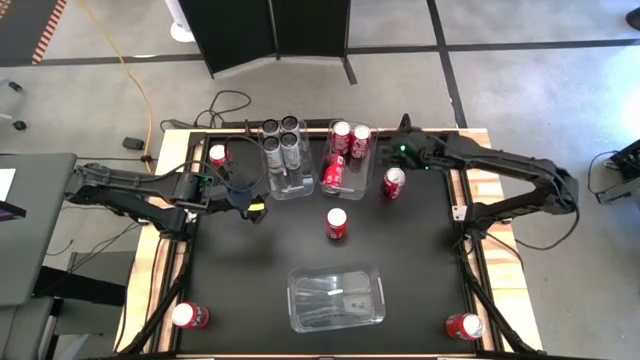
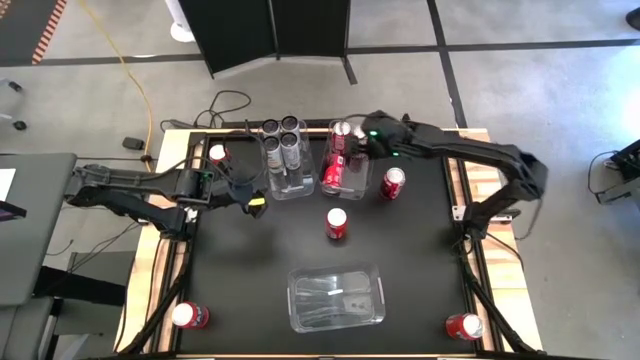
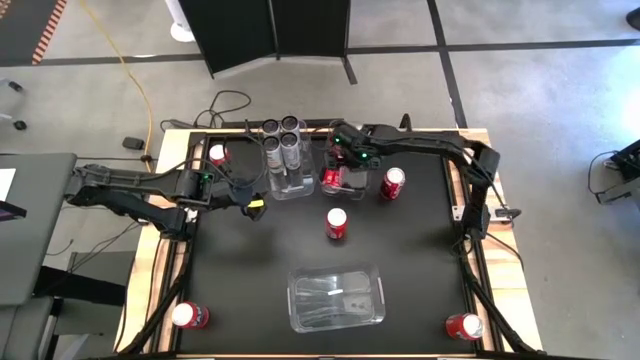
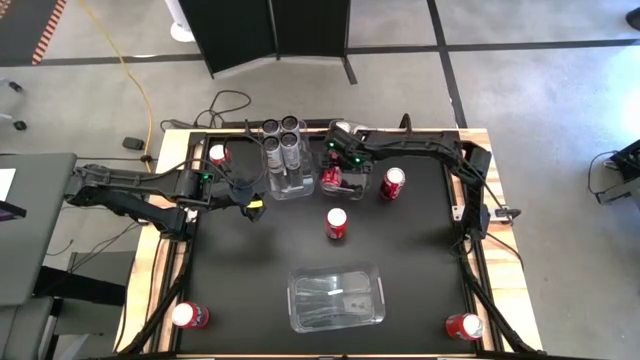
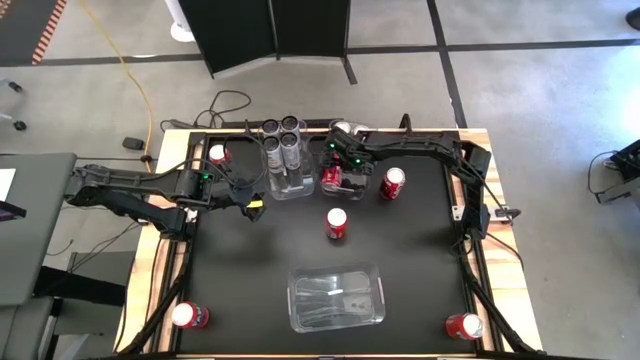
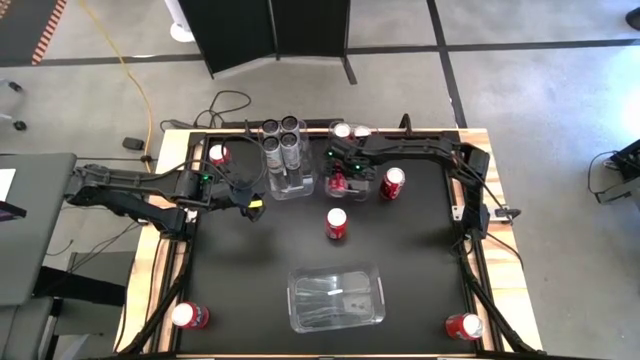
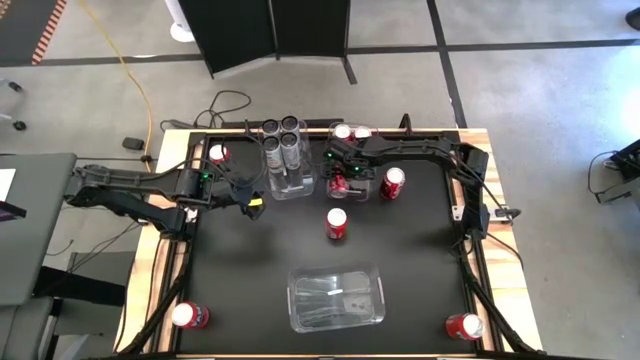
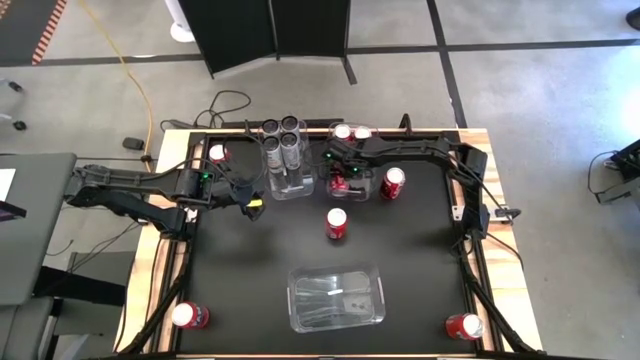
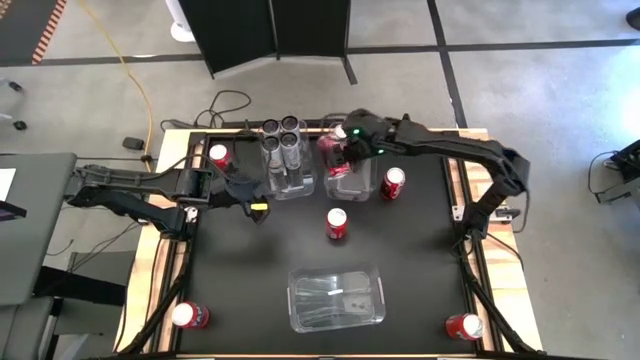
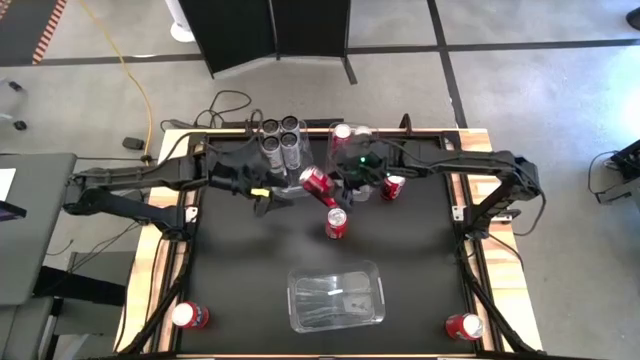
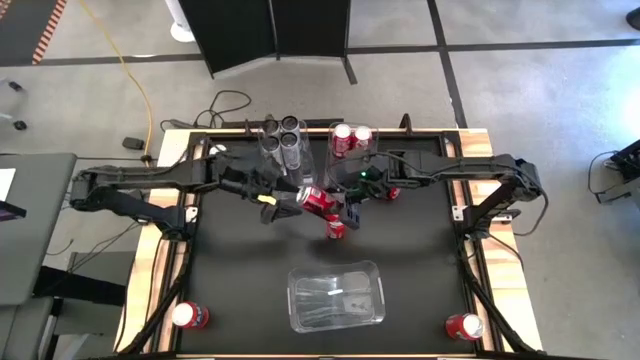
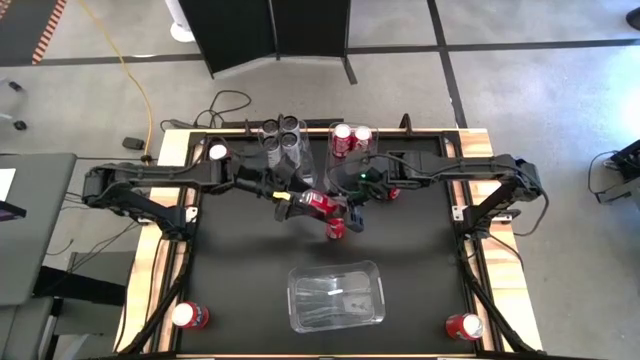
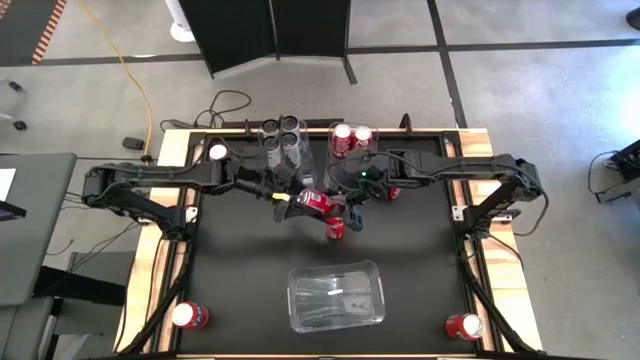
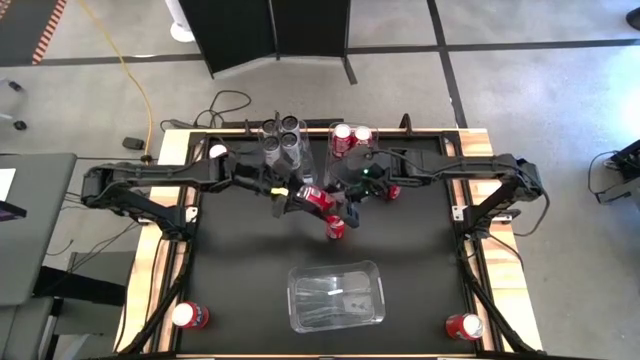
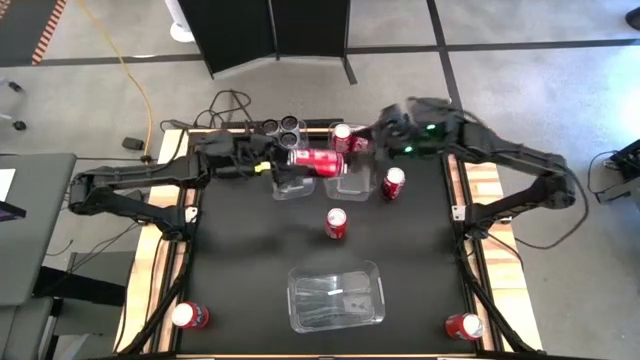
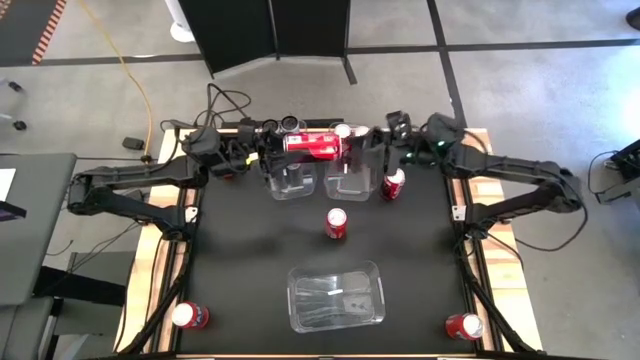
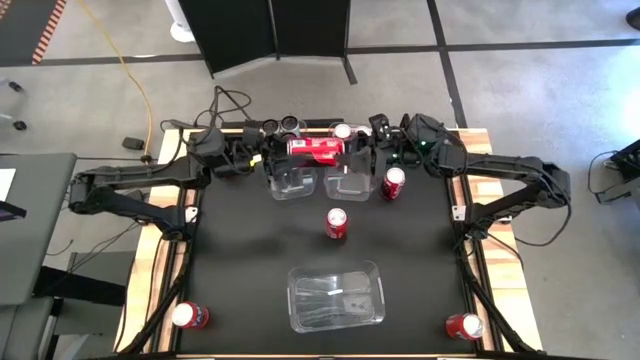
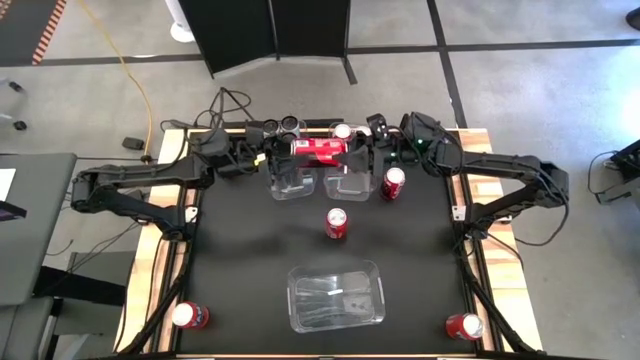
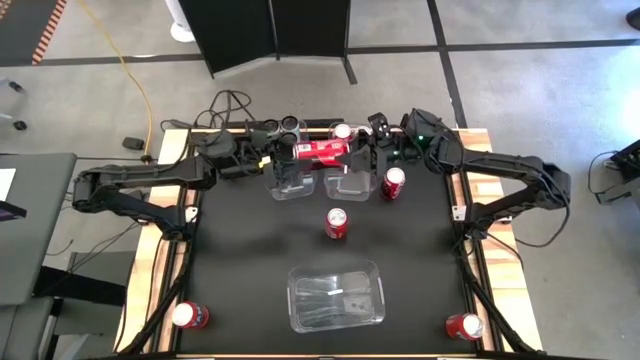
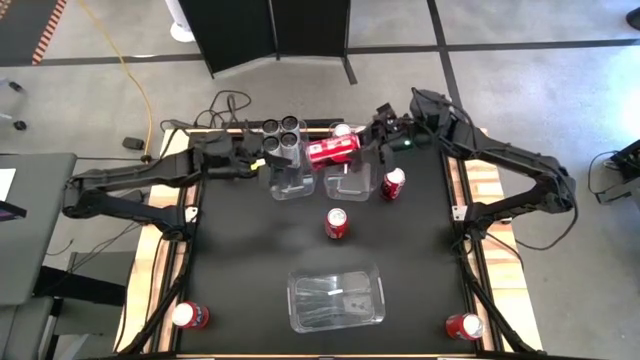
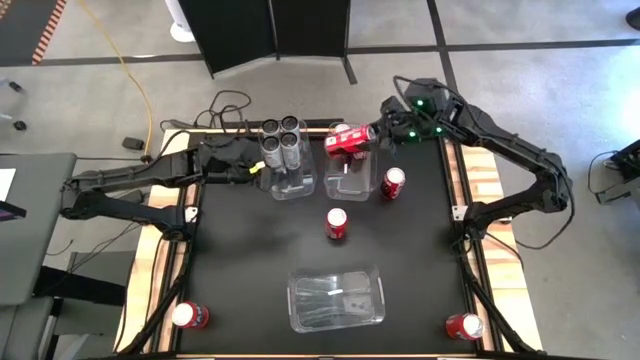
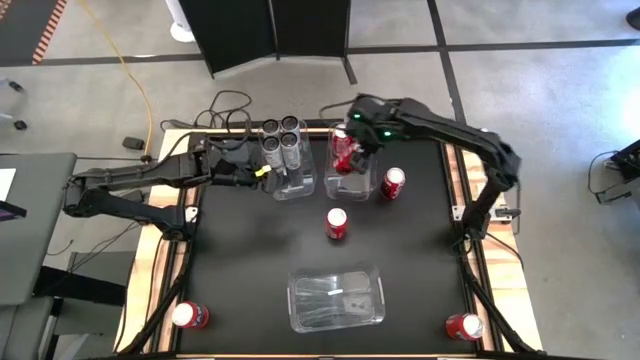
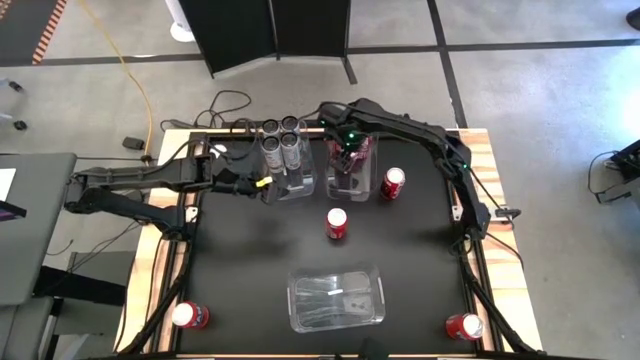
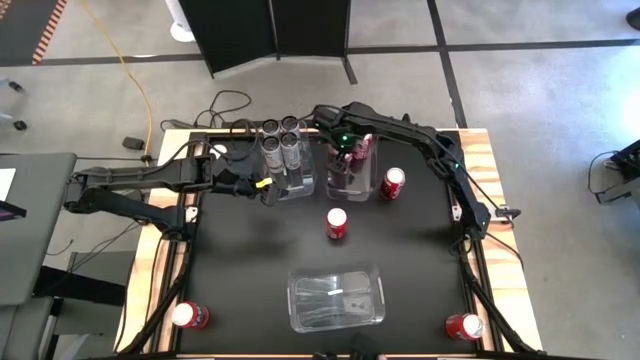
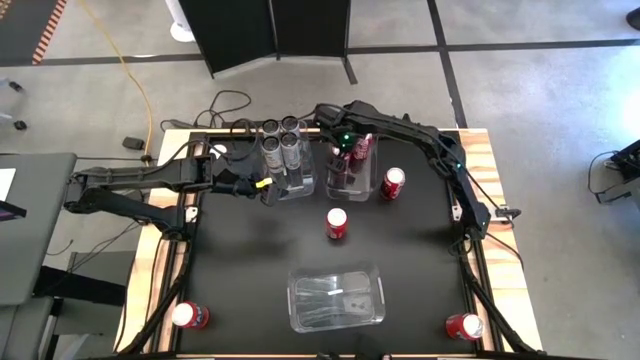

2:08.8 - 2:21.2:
Task: Sort soda cans
Adjust the red soda can in the top right transparent bin

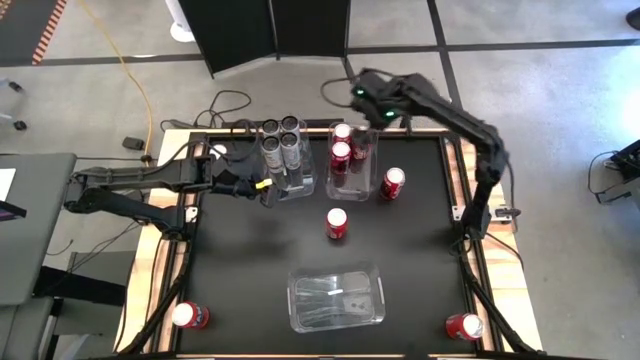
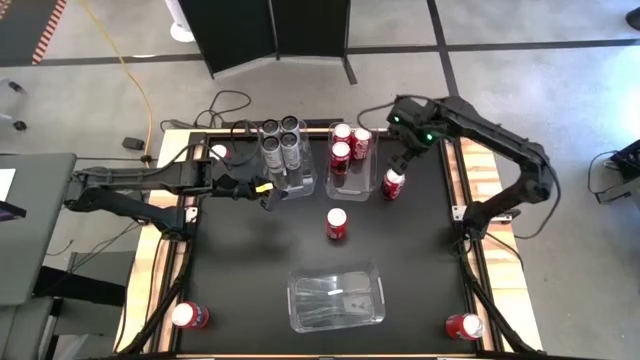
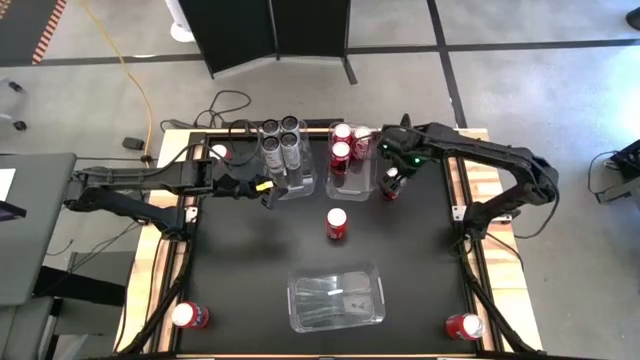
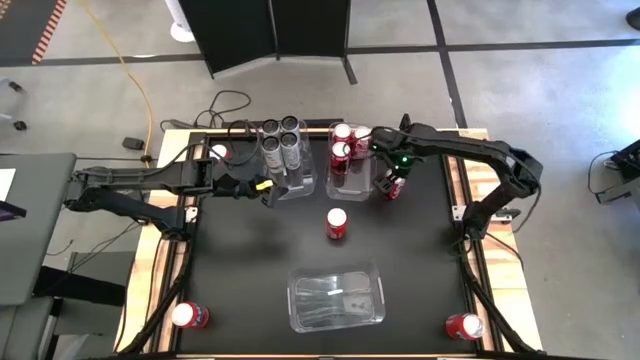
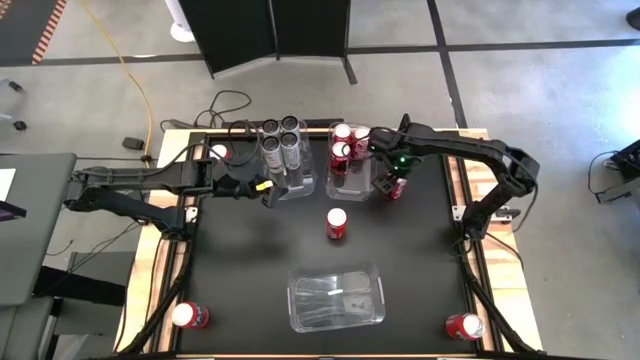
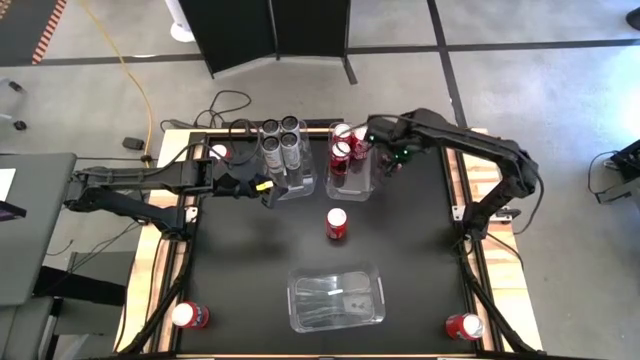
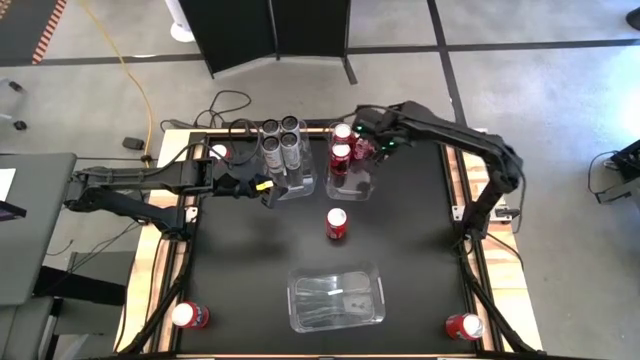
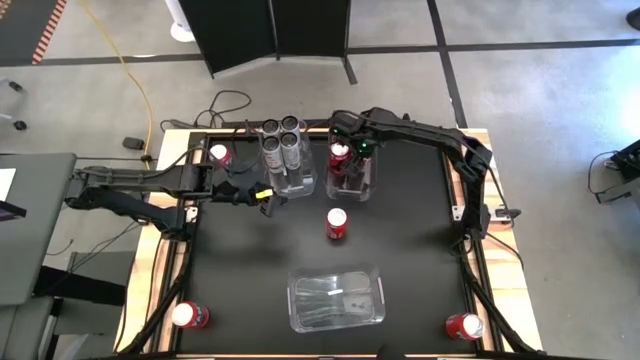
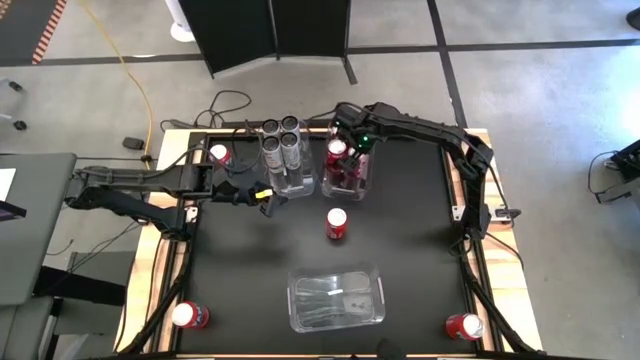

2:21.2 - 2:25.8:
Put the red soda can into the top right transparent bin

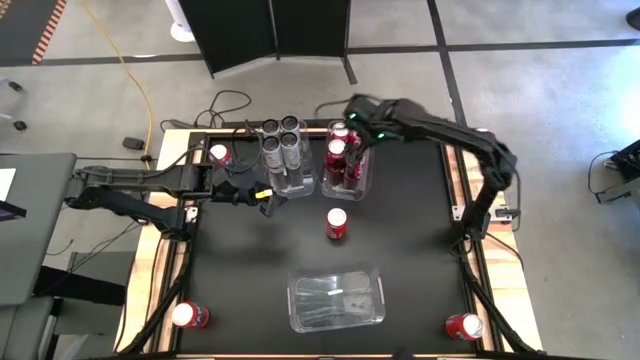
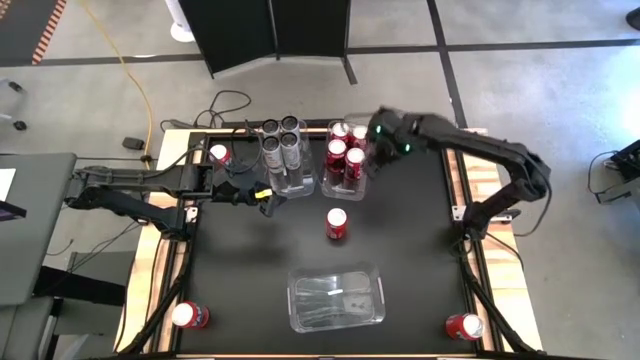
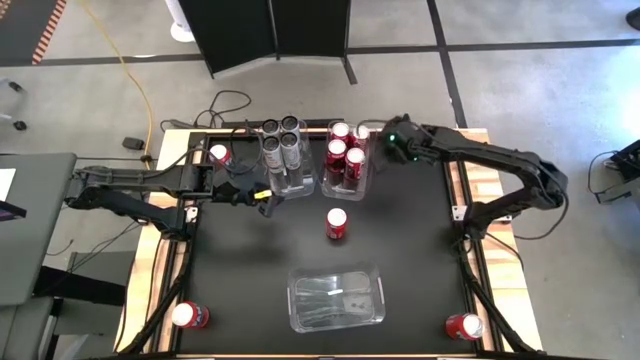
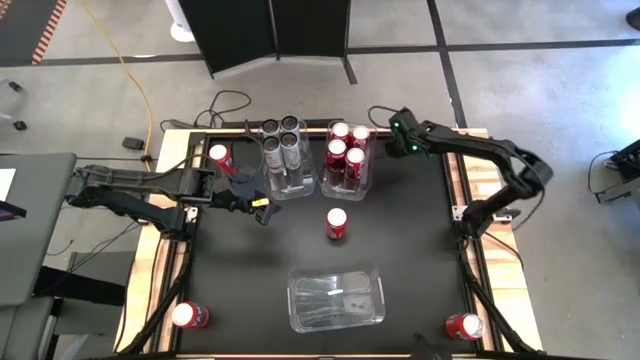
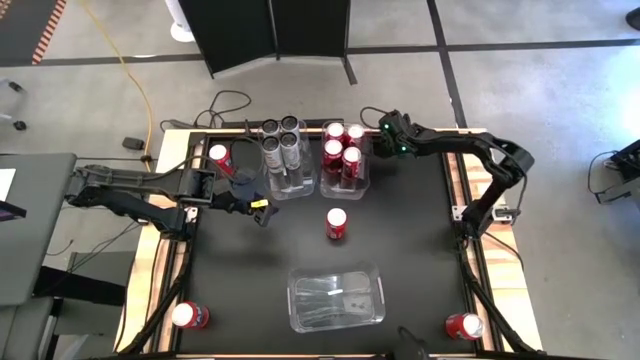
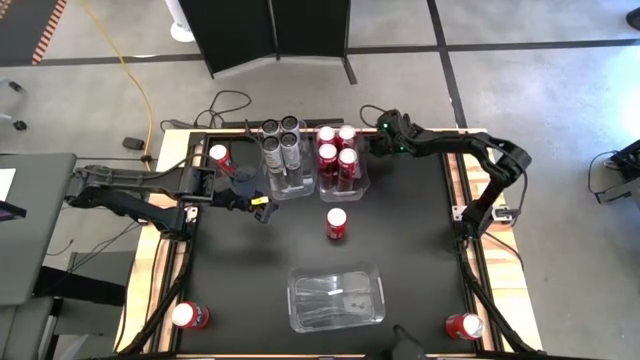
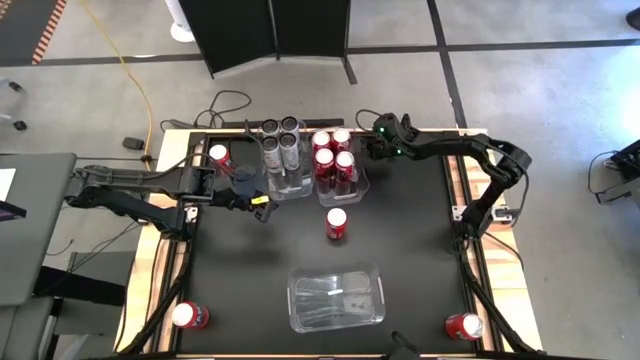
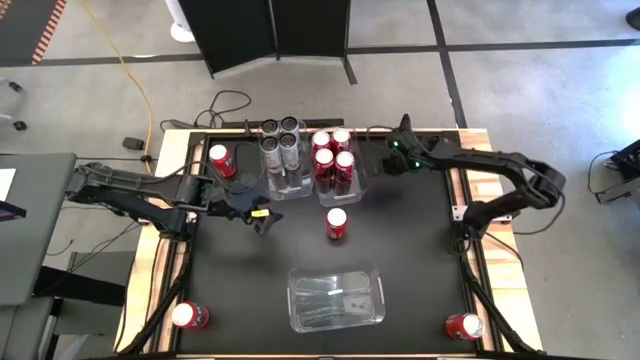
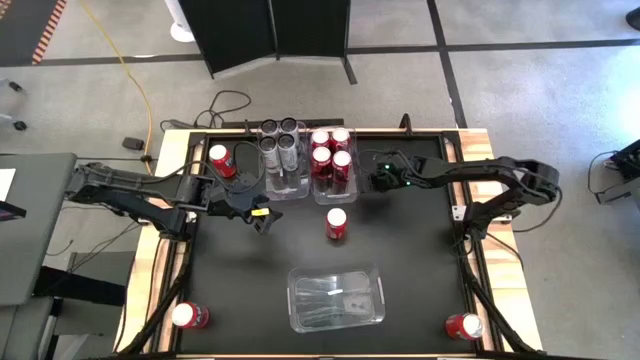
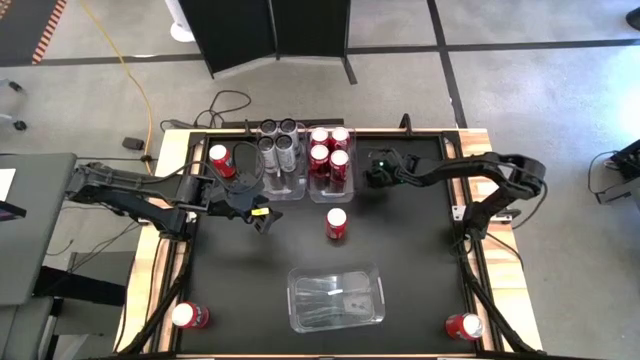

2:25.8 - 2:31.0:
Adjust the top right transparent bin
